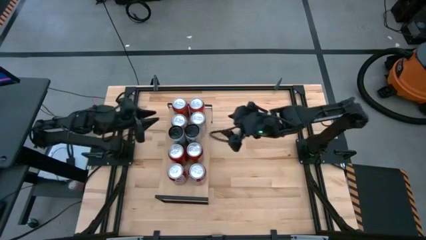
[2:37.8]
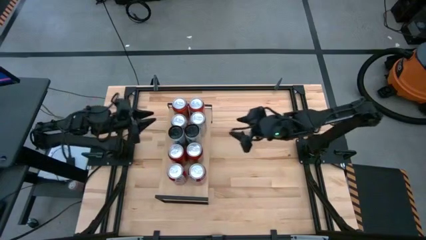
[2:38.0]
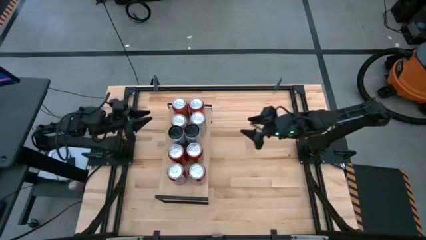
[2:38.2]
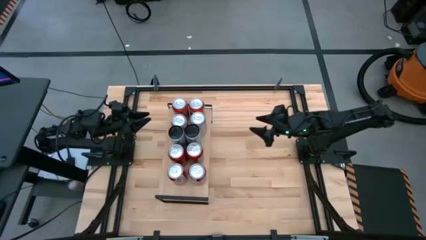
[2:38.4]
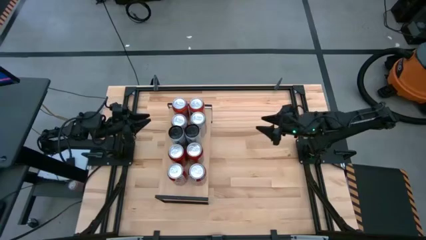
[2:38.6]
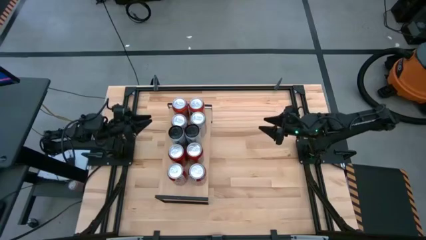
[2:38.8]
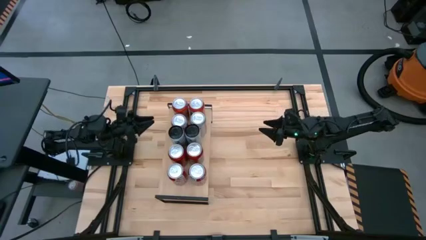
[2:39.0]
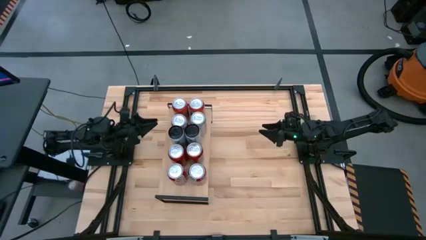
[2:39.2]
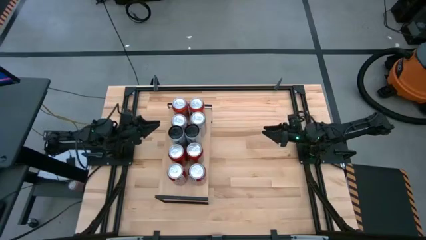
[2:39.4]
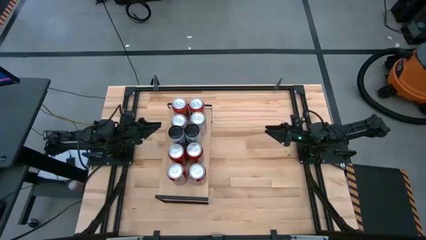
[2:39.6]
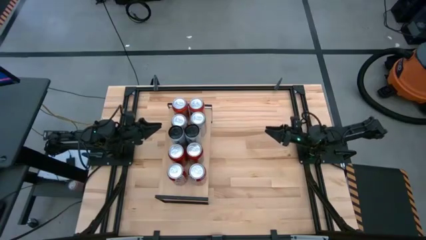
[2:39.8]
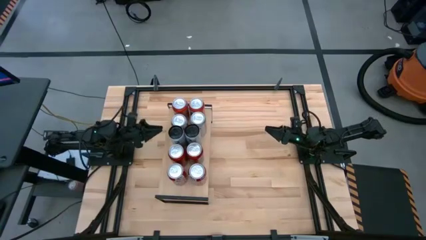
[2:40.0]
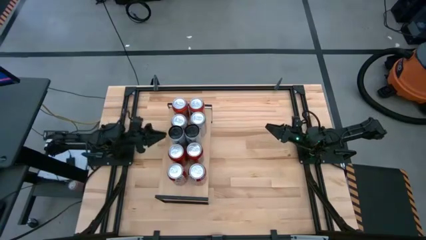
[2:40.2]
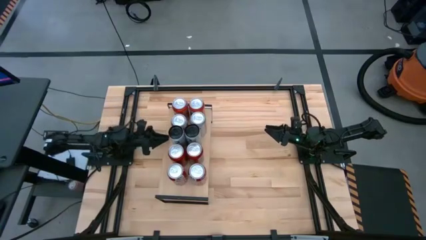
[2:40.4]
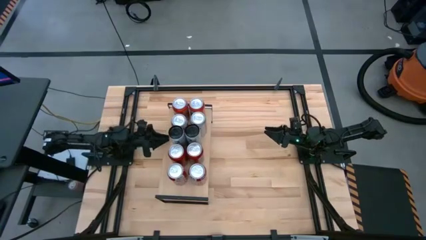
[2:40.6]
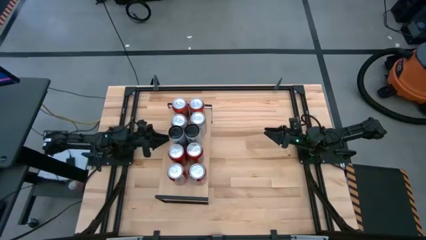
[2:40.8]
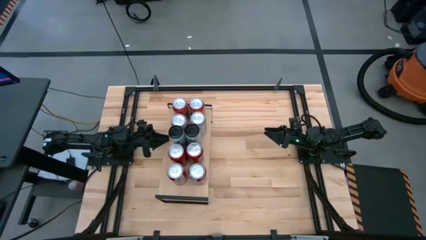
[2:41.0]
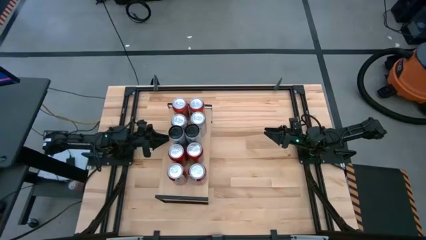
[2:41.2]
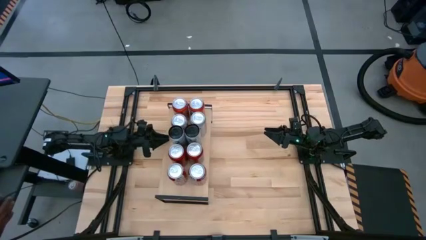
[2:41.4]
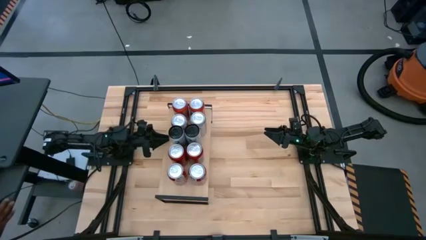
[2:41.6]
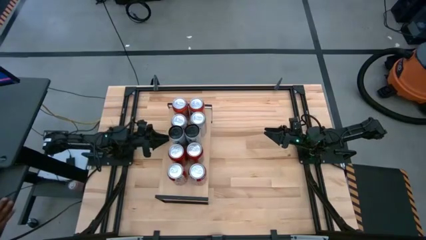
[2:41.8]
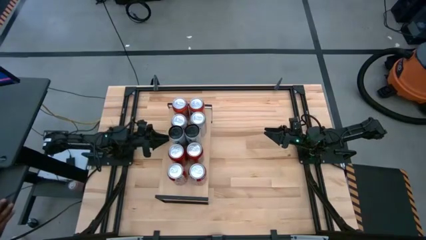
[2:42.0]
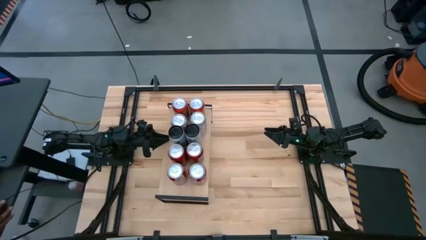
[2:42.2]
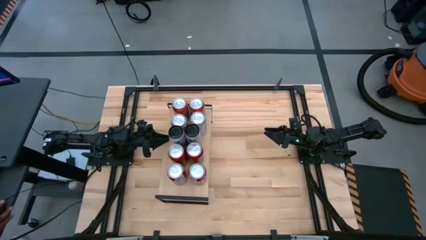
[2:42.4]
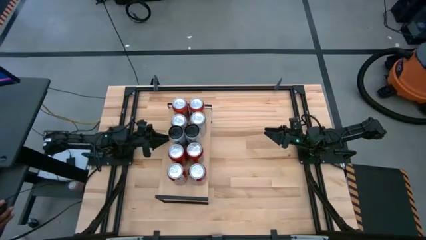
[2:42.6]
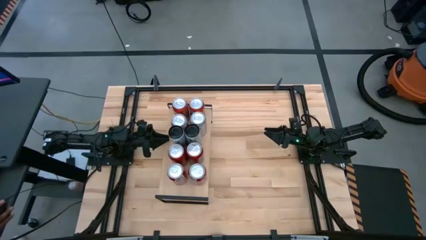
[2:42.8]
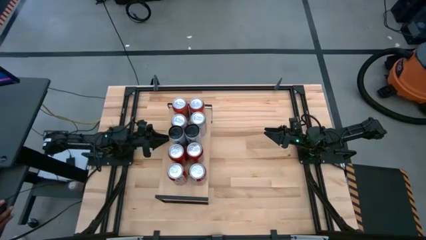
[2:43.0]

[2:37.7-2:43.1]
Task: Pick and place cans onto a shelf
Return to Home Position

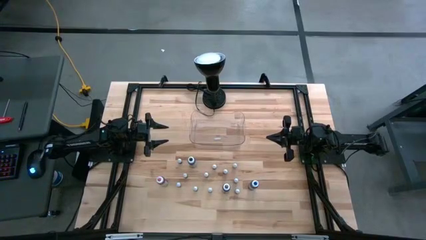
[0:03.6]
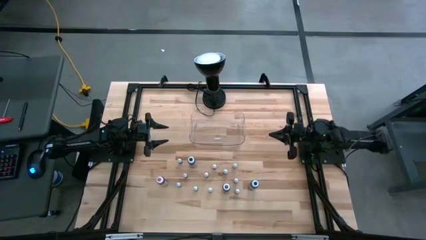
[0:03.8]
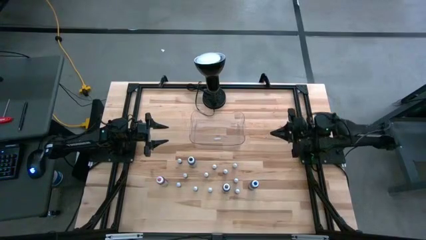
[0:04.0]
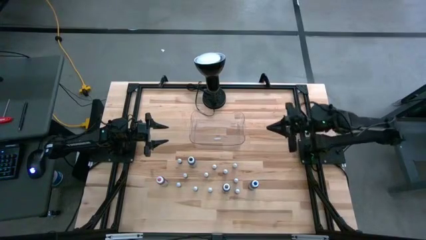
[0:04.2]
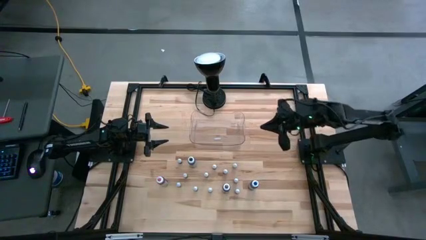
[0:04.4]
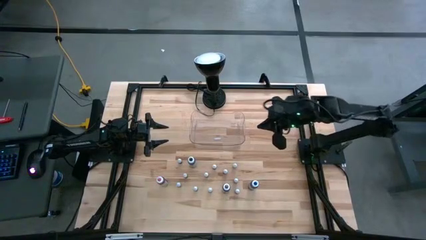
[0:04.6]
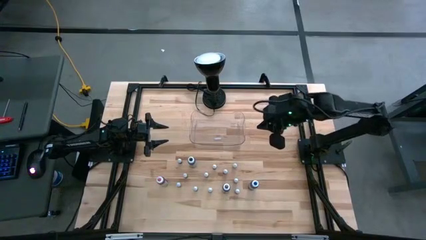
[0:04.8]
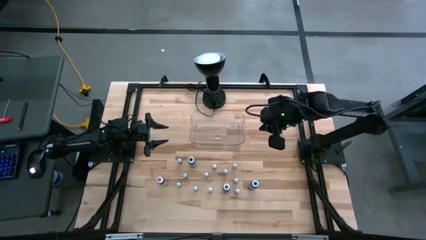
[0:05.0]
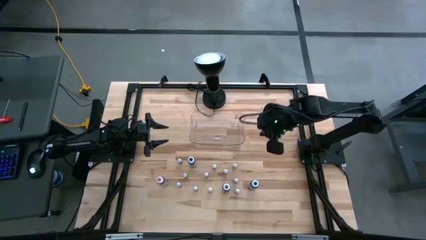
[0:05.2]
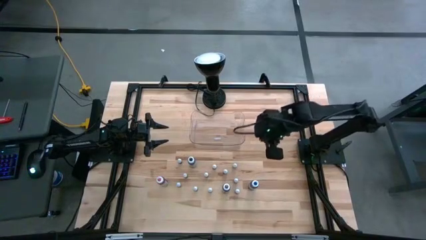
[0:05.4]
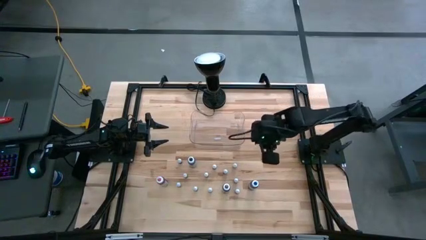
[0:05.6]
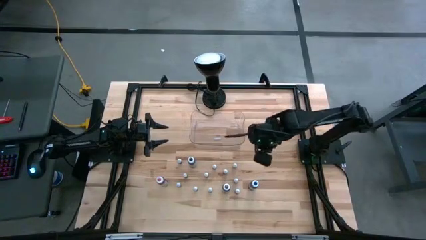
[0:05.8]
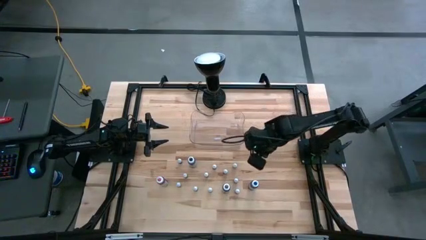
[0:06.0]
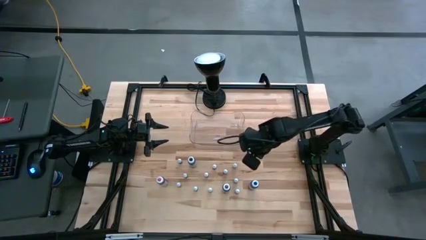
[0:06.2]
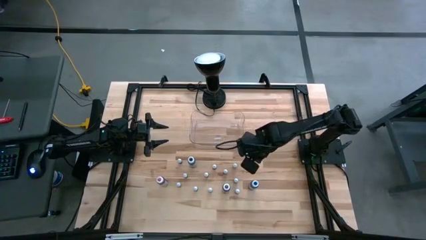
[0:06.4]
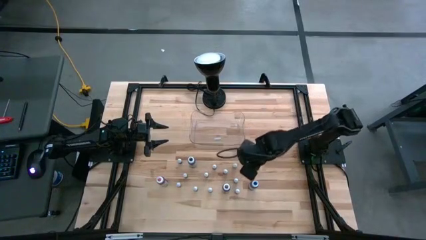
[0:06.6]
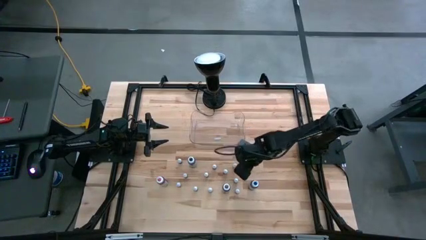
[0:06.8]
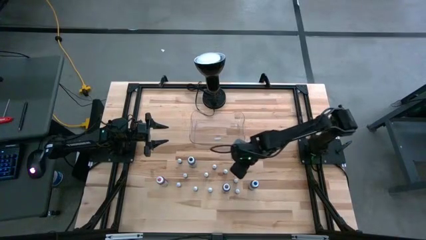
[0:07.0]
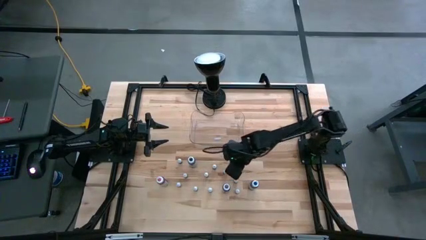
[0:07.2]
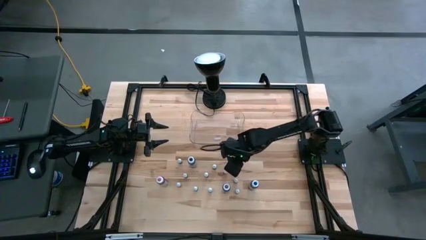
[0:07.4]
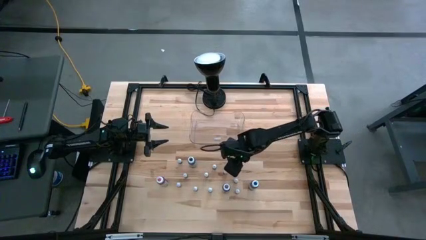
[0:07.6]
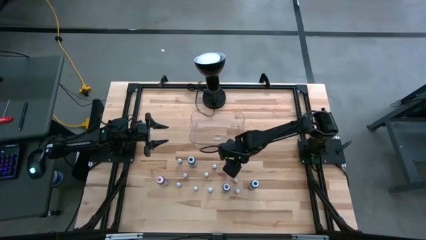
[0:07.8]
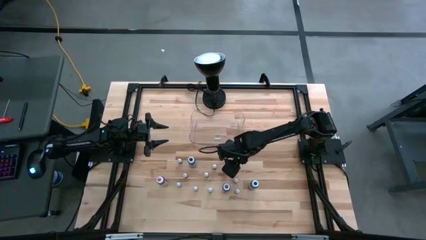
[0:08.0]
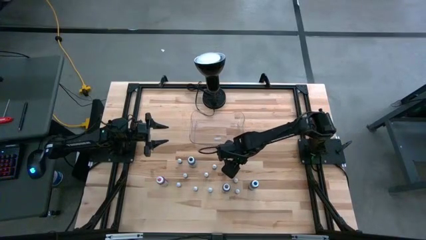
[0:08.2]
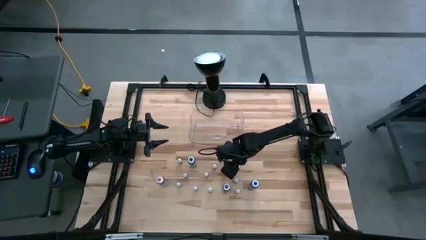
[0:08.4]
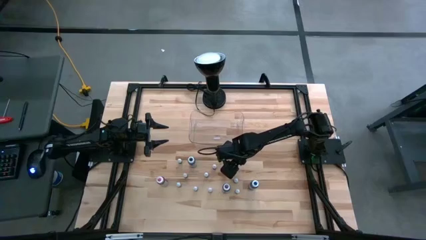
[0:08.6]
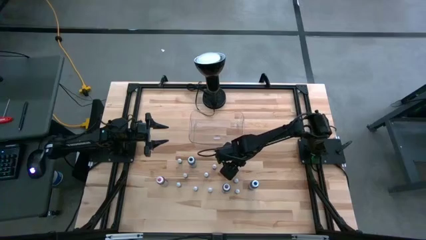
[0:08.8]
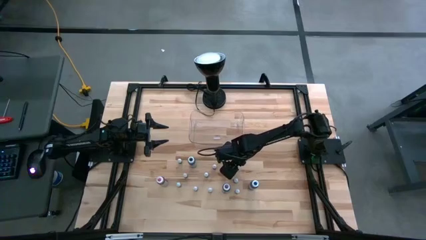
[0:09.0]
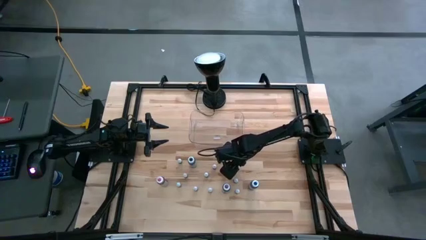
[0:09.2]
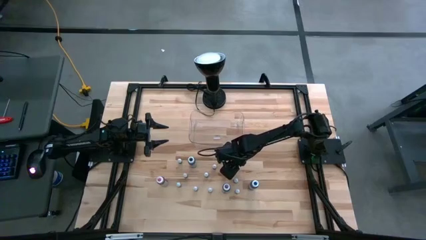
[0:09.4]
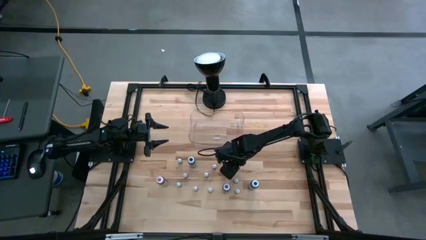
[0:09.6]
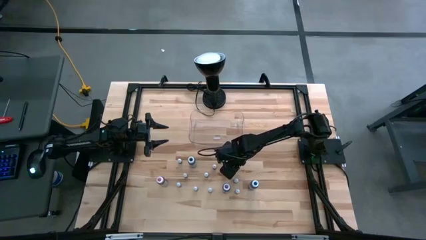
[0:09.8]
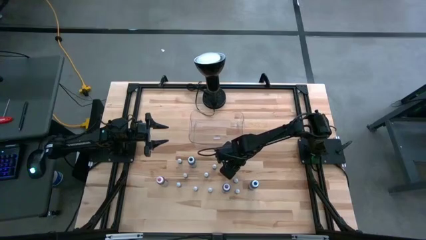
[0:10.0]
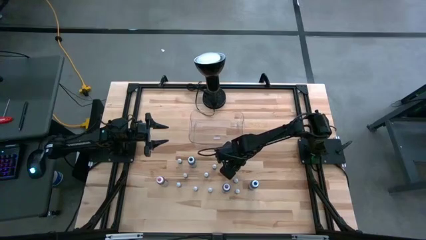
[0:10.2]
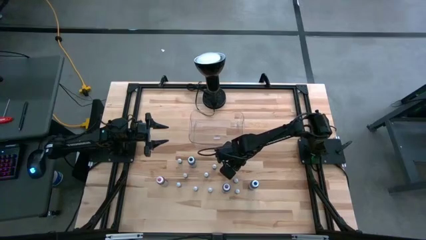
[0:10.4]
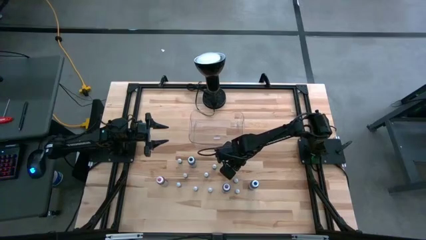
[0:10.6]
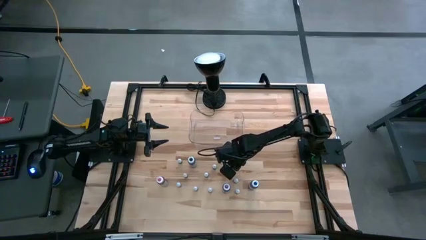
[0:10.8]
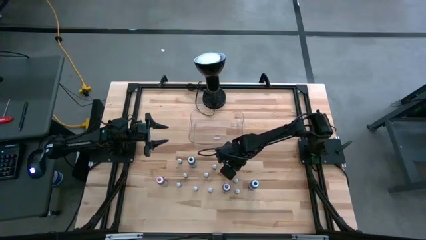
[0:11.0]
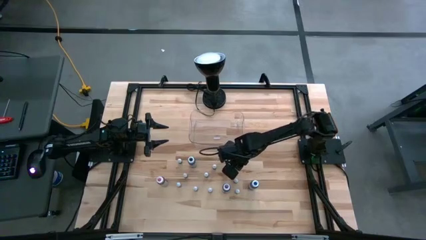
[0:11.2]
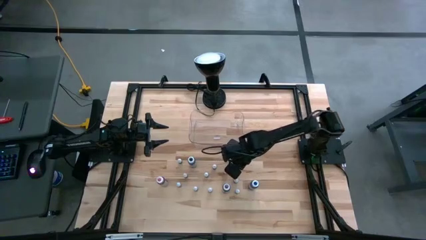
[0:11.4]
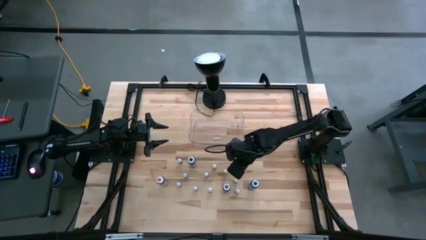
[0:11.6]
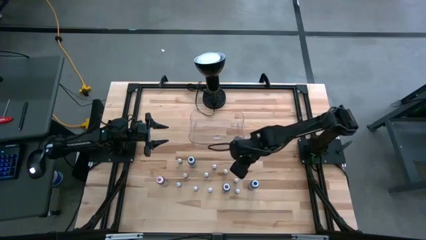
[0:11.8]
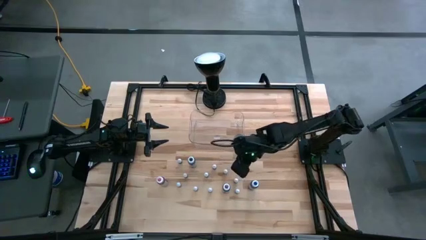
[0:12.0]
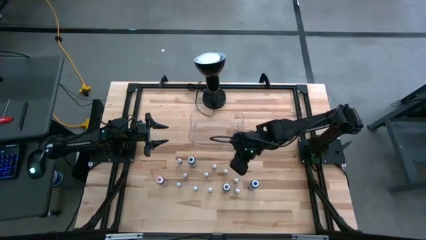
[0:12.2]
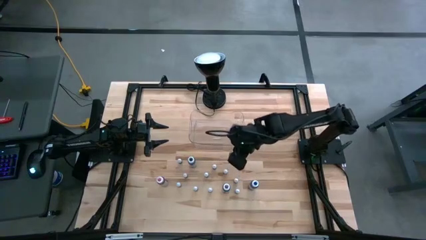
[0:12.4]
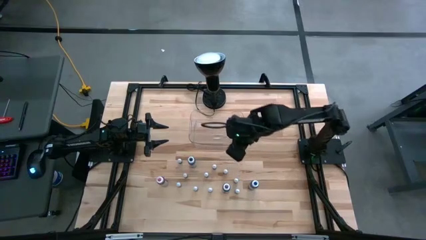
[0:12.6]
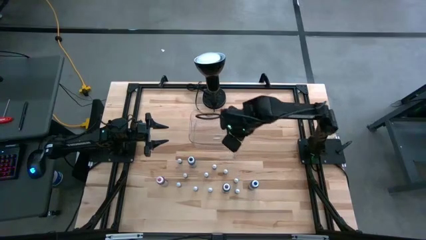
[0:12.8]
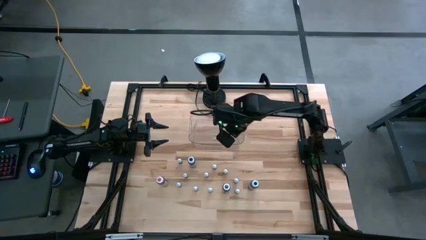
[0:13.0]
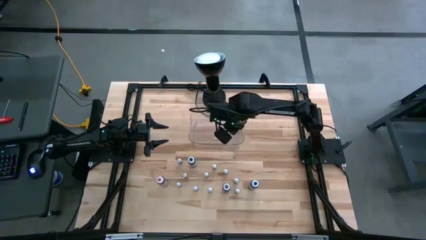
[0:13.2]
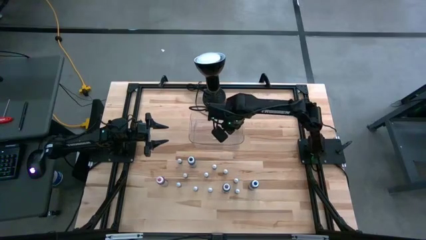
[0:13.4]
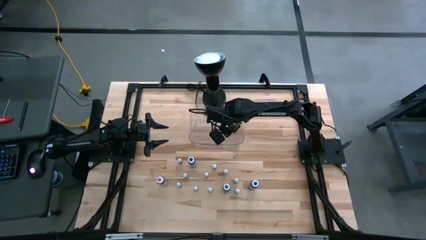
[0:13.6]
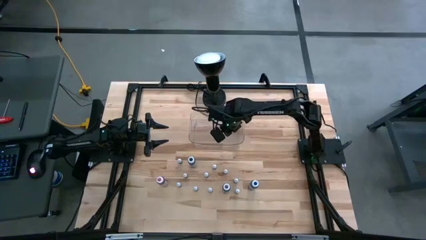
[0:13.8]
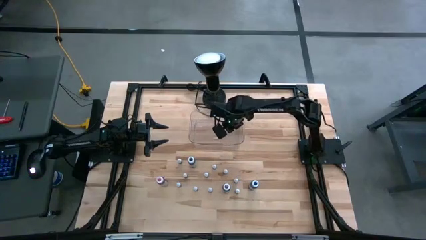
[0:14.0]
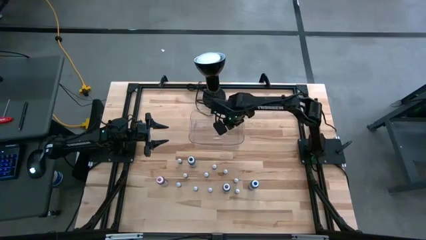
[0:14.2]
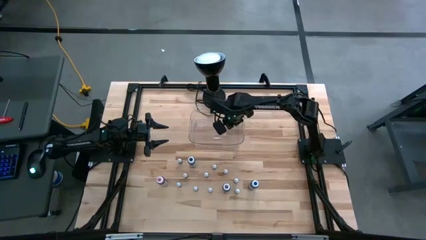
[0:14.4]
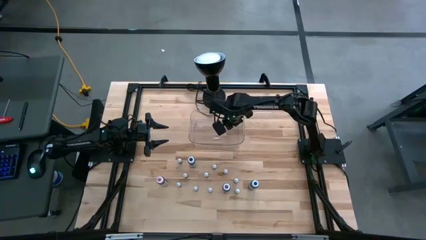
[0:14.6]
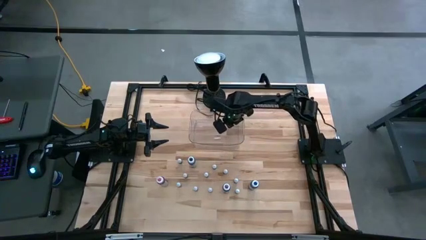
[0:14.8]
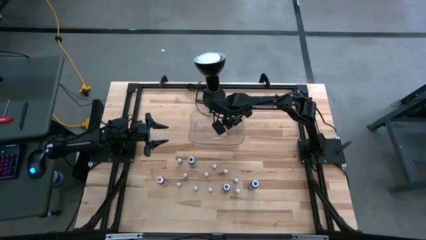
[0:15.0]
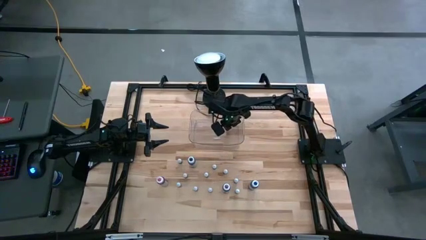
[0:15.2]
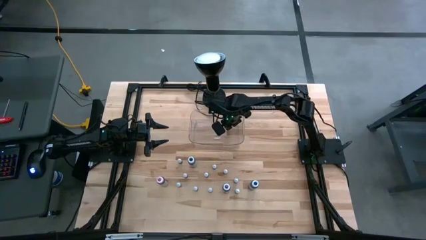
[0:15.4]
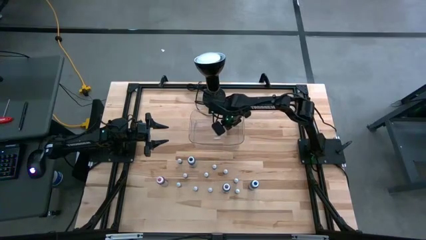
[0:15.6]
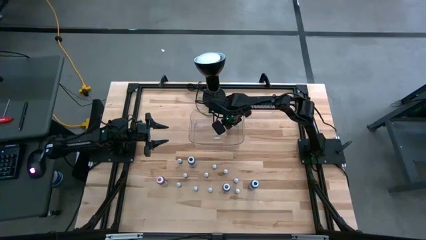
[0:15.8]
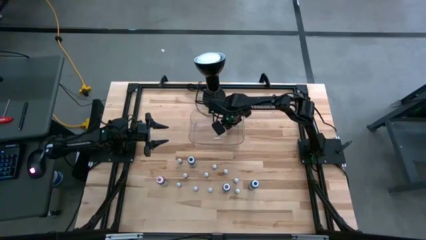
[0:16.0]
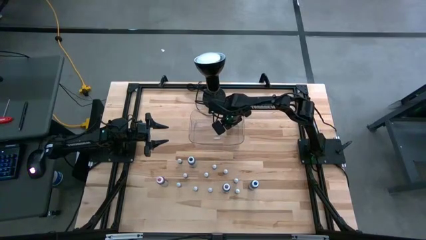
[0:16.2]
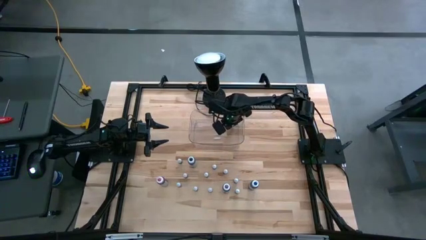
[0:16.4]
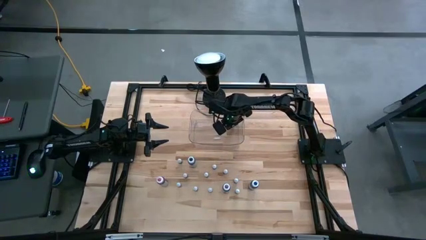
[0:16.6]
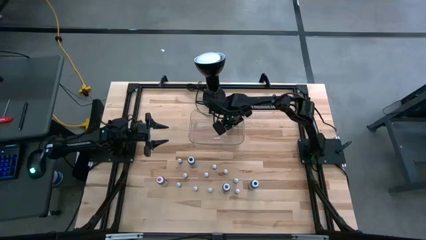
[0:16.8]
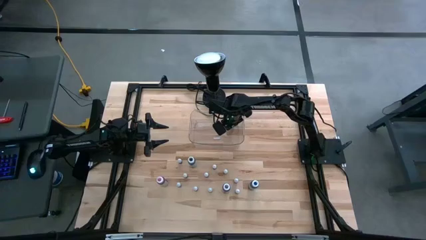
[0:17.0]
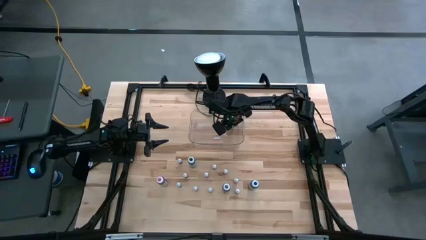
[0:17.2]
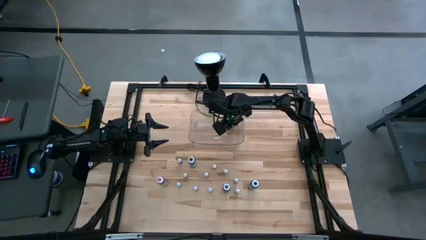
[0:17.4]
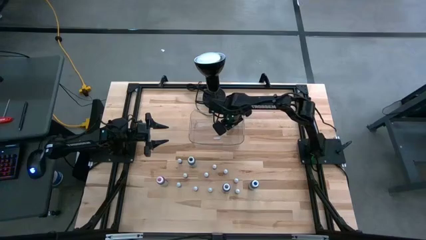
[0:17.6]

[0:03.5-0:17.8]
Task: Pick & Place food coloring
Put the right green food coloring bottle into the transparent bin
